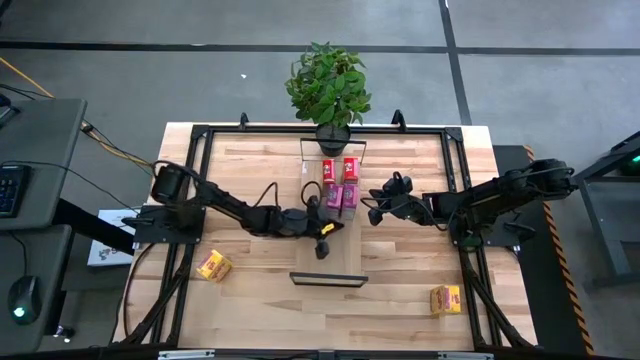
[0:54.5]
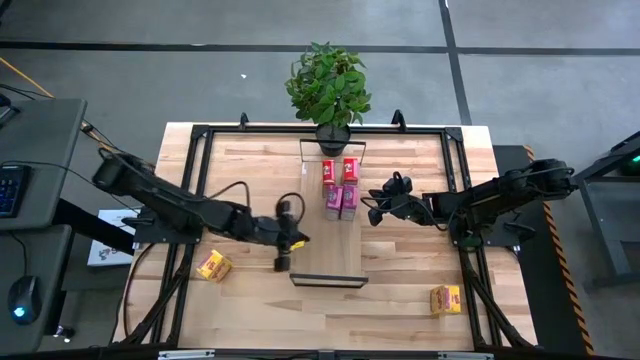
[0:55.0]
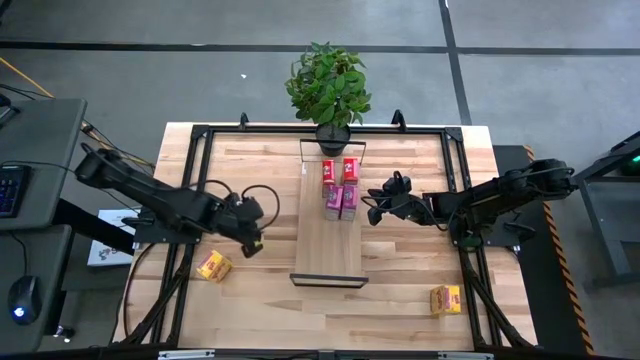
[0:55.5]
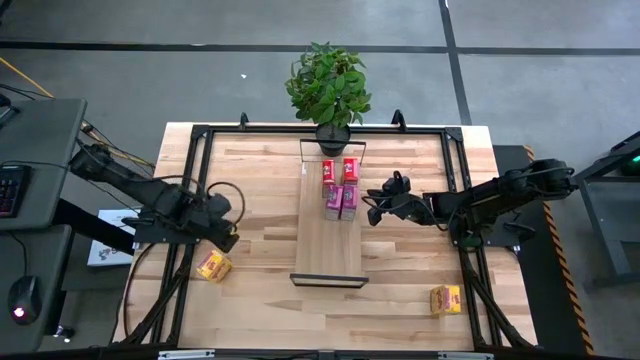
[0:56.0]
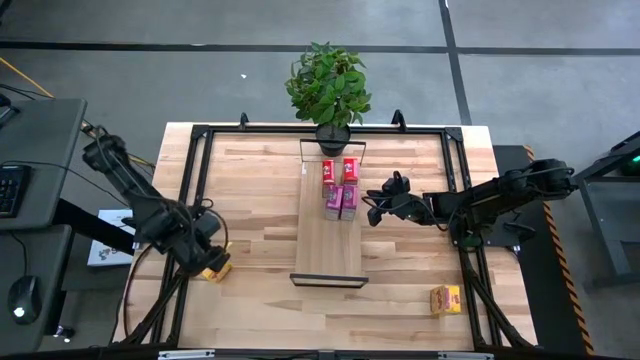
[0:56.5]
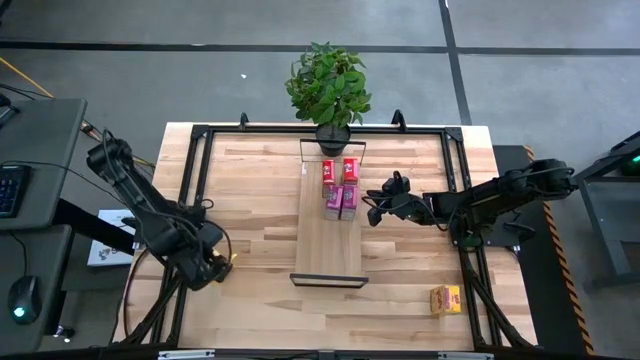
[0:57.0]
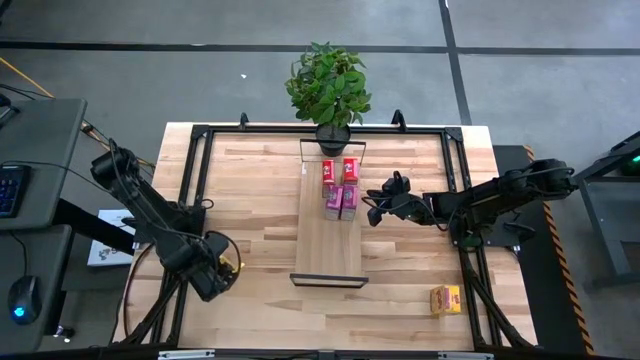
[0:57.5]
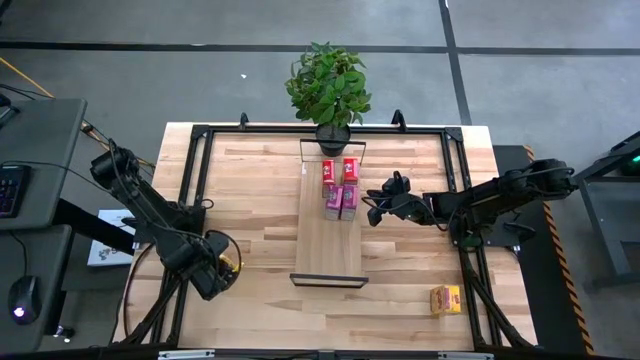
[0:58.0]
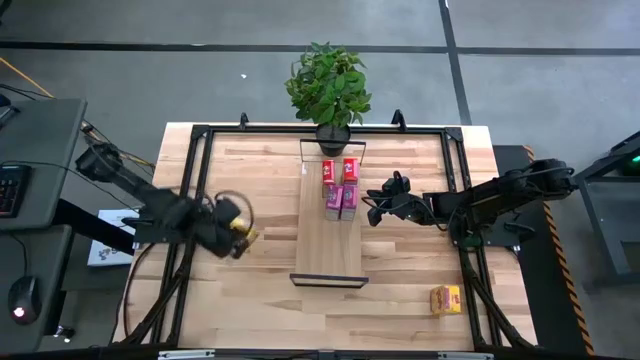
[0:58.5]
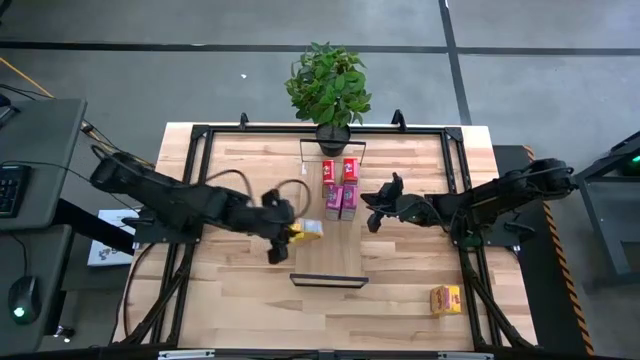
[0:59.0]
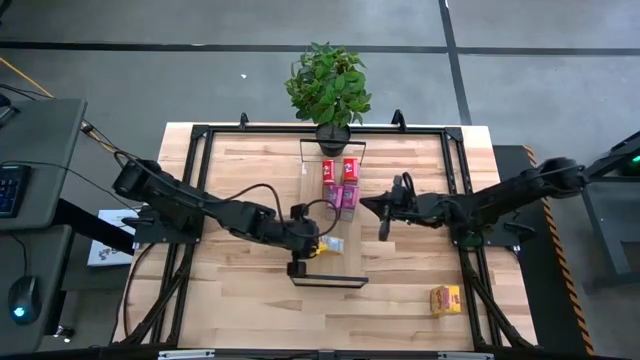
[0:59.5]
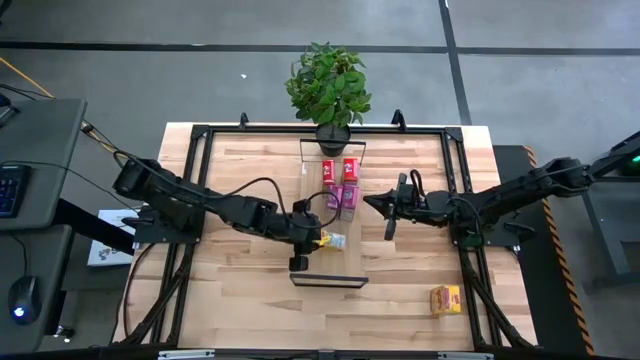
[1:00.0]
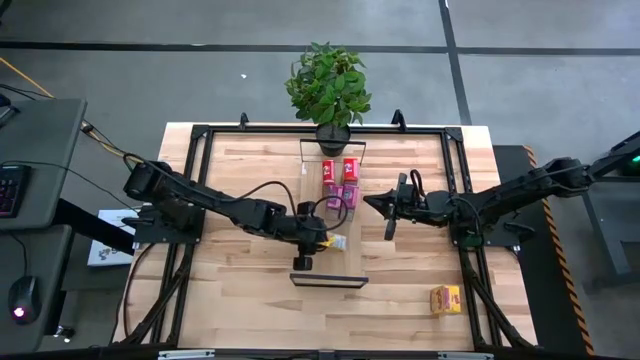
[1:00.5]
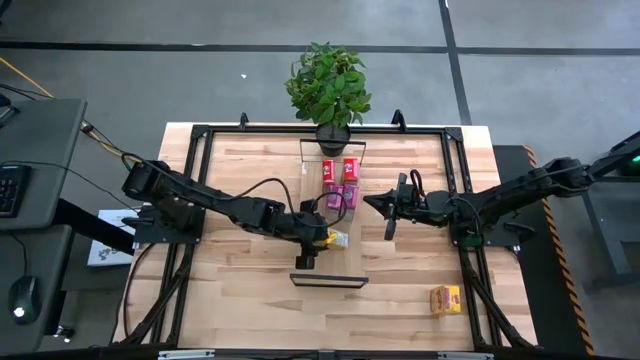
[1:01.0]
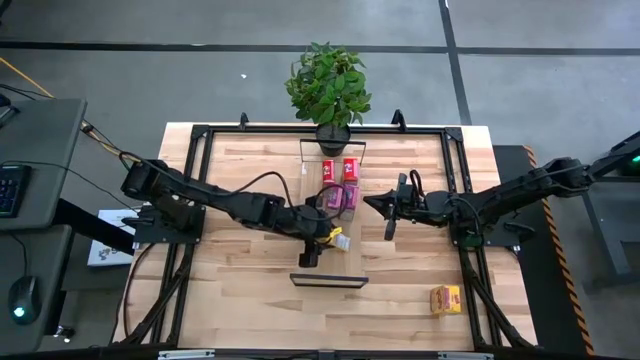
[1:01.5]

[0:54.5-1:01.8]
Task: Stack cereal on shelf
Put the left yellow cereal box on the shelf

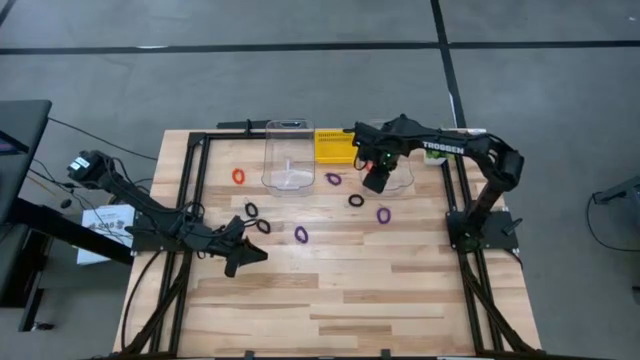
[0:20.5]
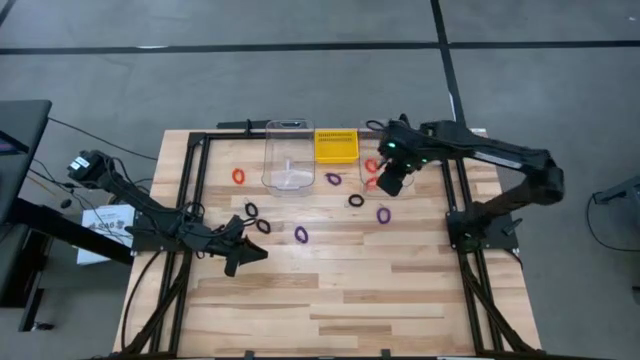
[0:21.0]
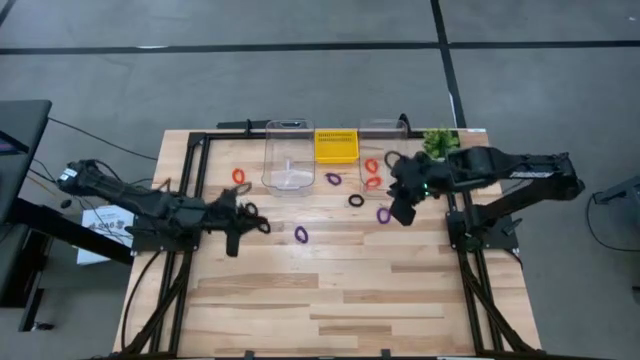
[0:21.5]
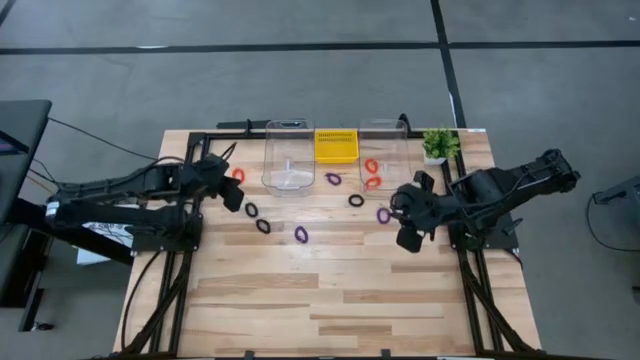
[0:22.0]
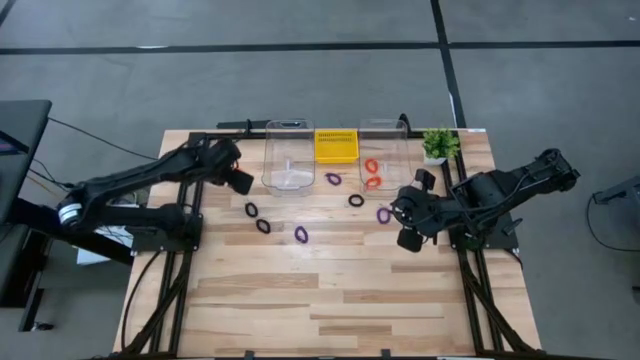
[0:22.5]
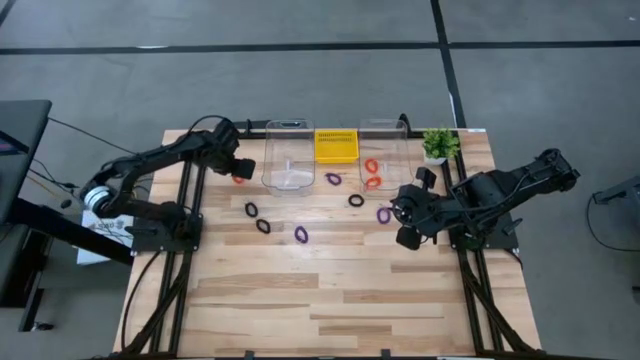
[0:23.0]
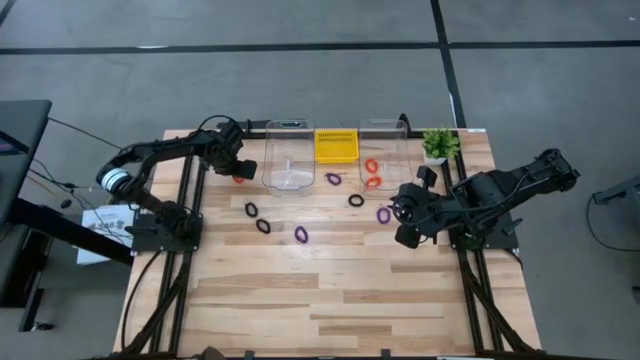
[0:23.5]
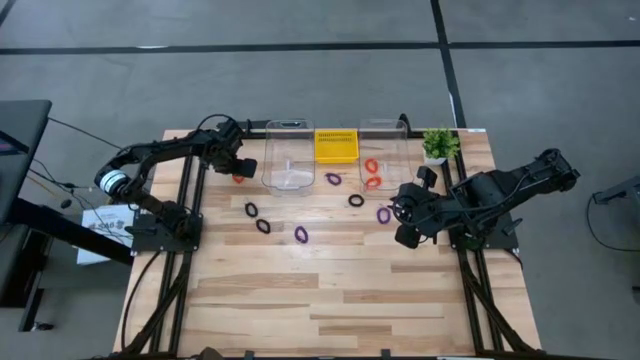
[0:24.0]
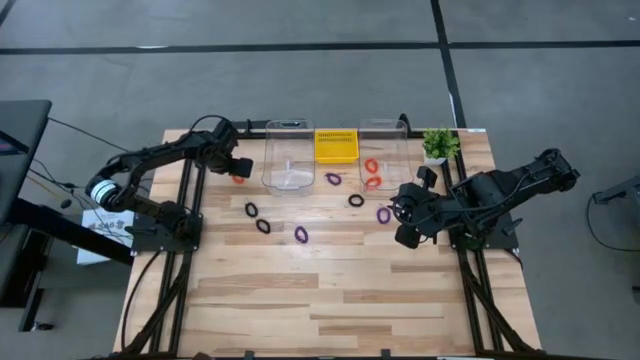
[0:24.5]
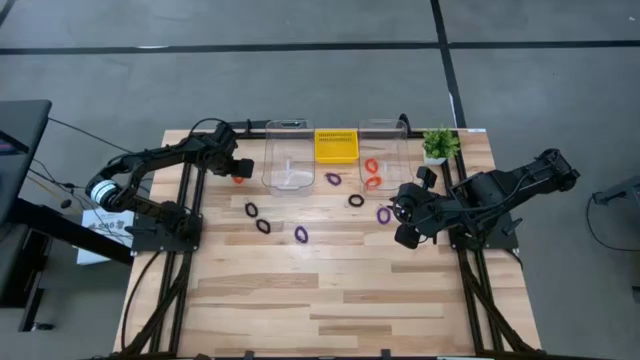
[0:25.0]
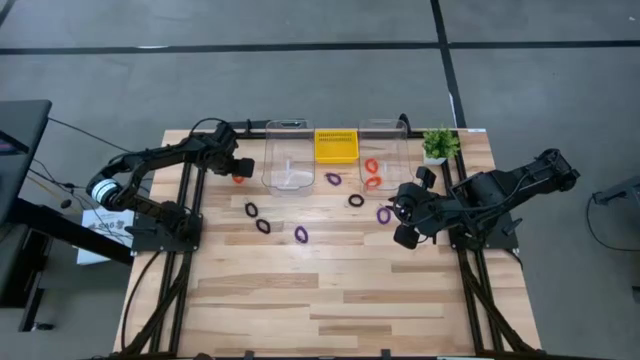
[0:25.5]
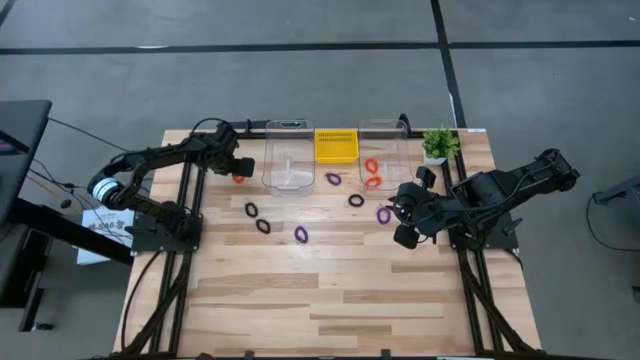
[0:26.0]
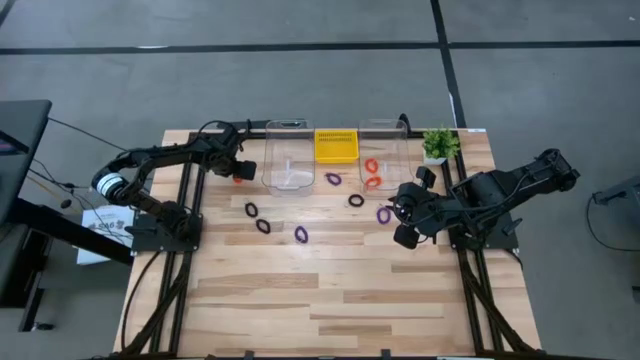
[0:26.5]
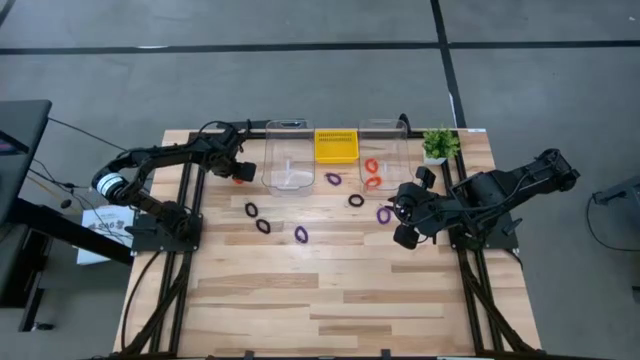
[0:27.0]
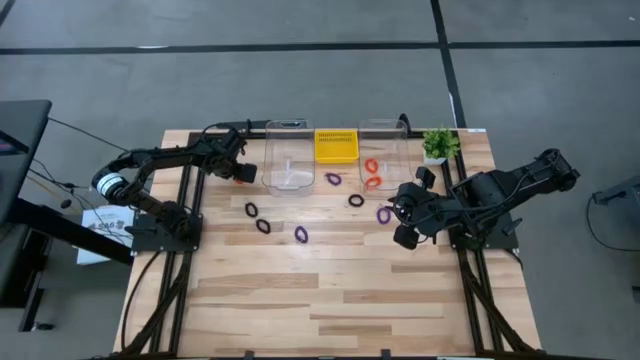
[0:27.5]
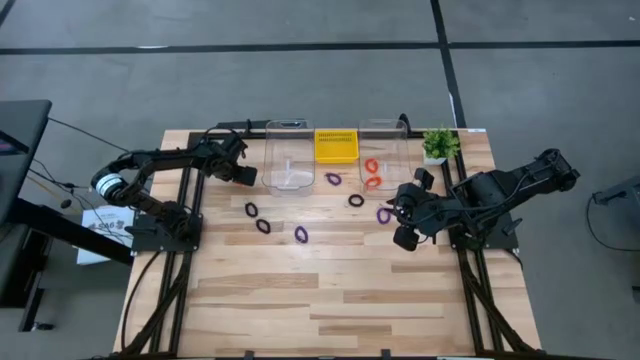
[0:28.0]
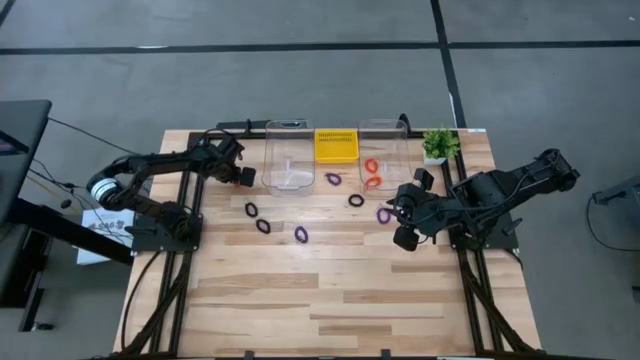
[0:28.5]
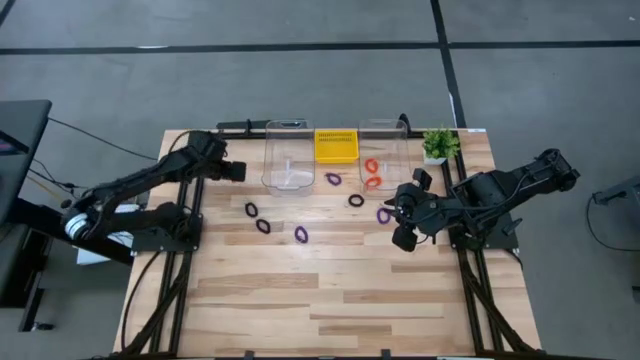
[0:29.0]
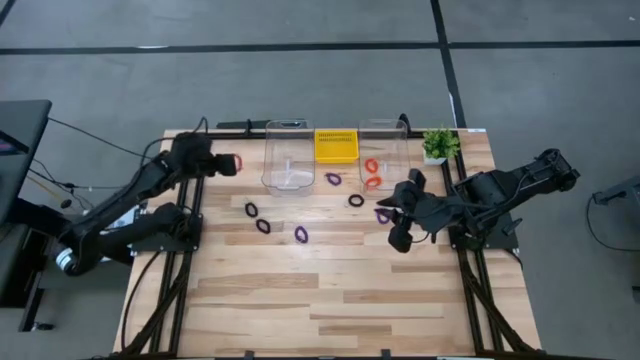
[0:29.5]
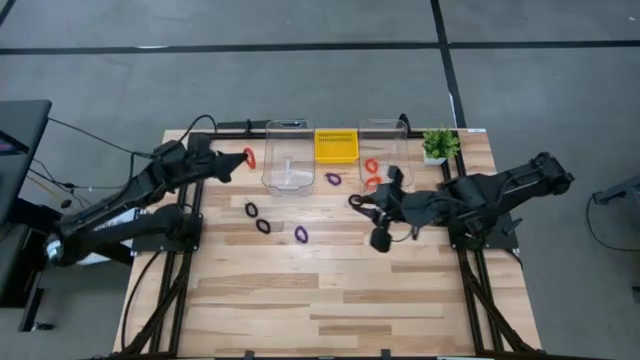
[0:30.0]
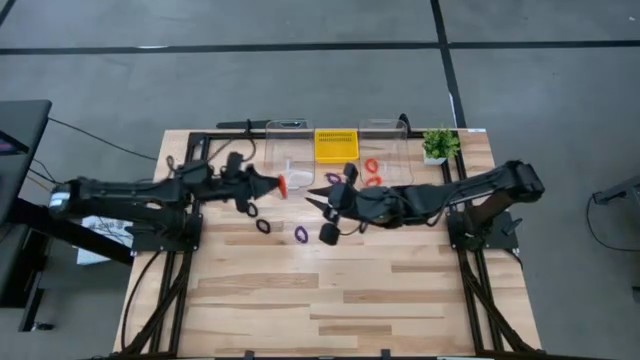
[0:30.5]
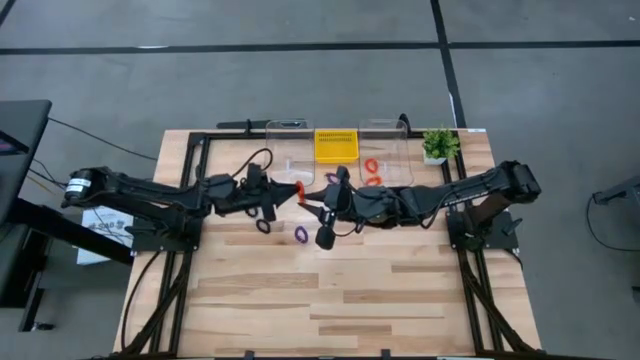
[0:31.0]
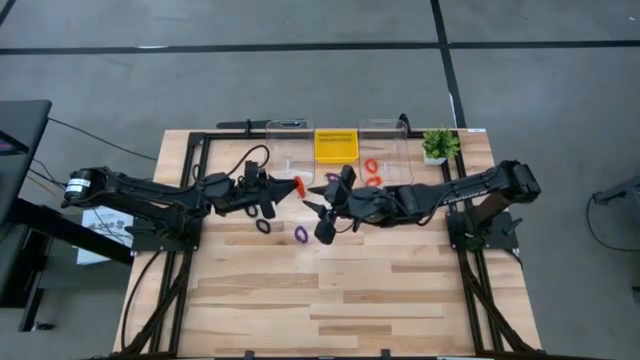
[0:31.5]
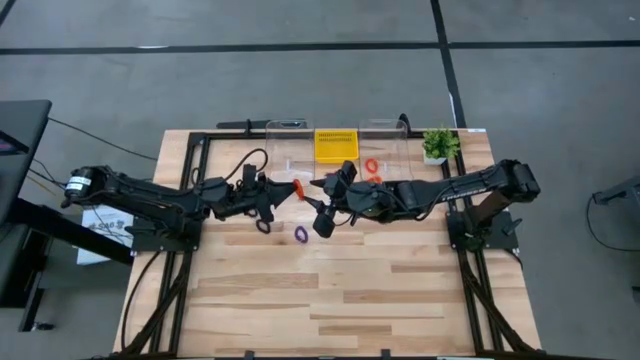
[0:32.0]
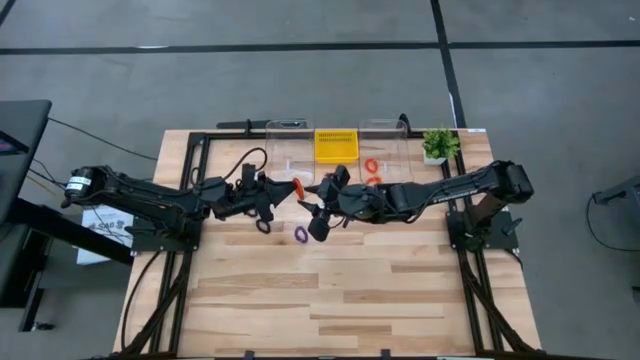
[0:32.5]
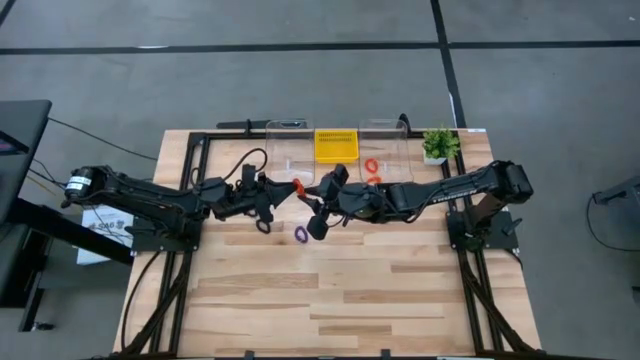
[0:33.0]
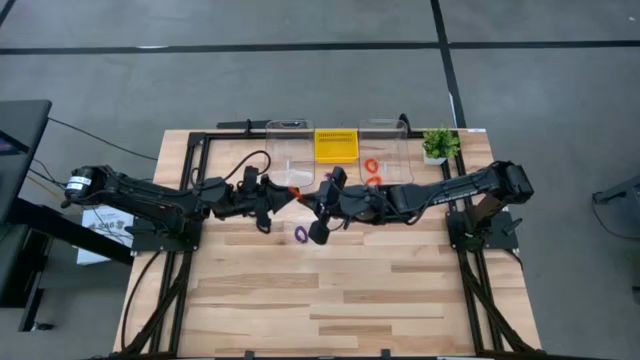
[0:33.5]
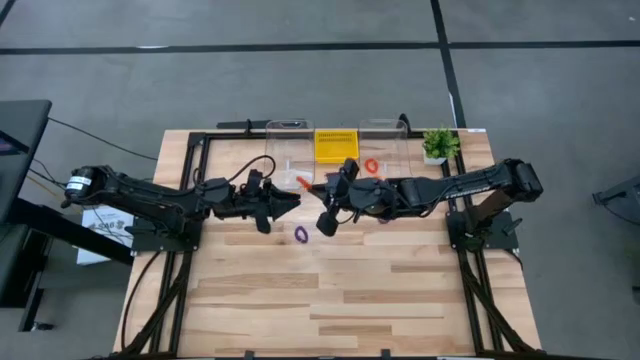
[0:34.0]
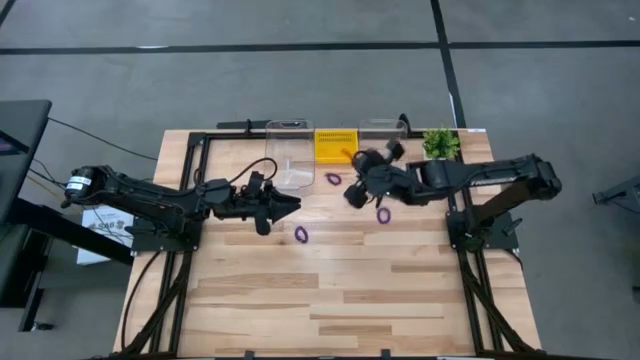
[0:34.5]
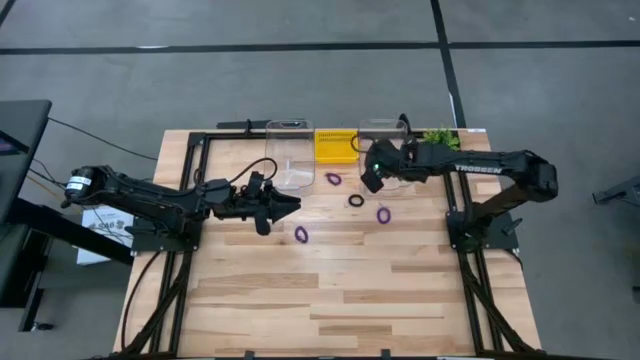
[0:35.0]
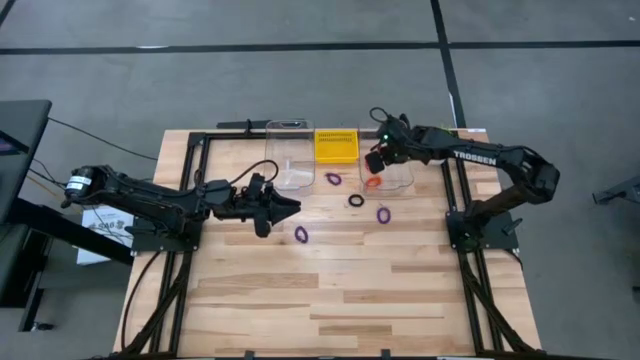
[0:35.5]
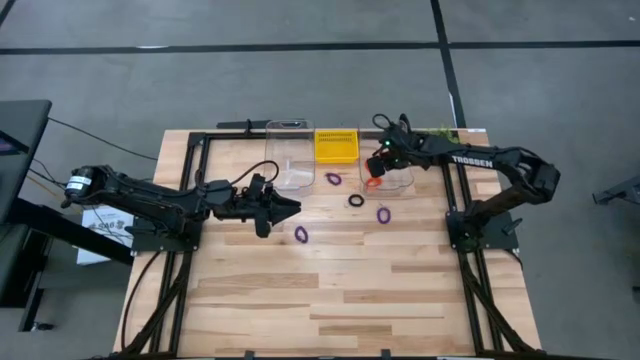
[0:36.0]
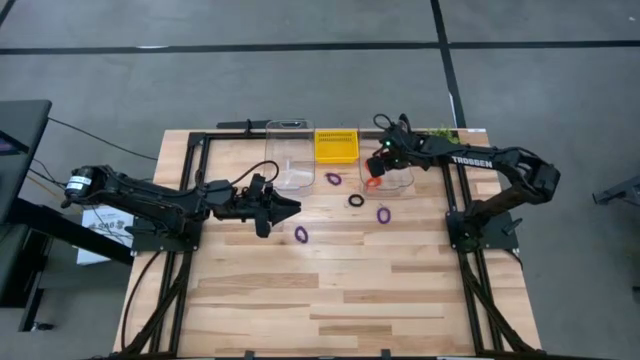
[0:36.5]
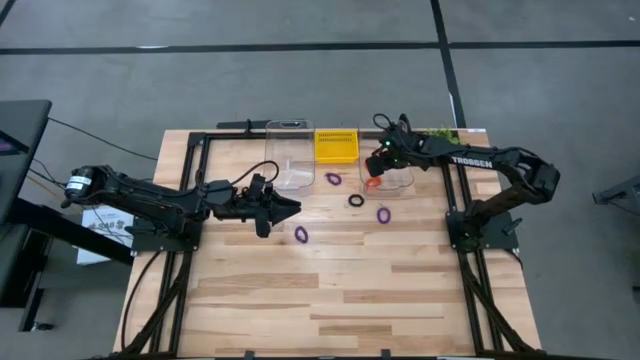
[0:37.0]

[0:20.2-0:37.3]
Task: Sort spring keychains
Put the orange spring keychain into the right transparent bin
